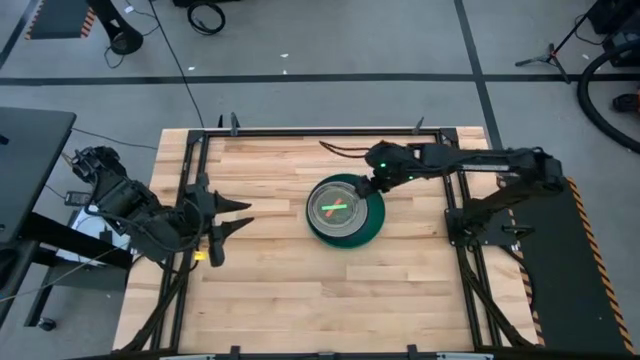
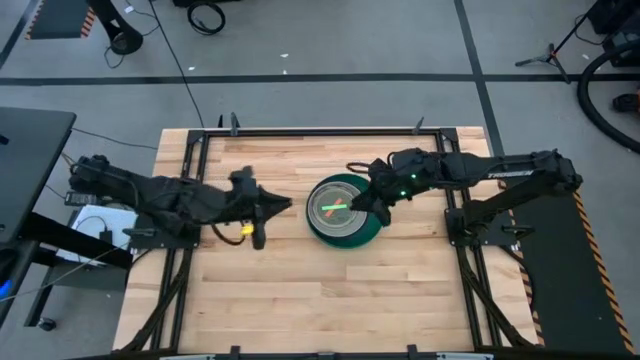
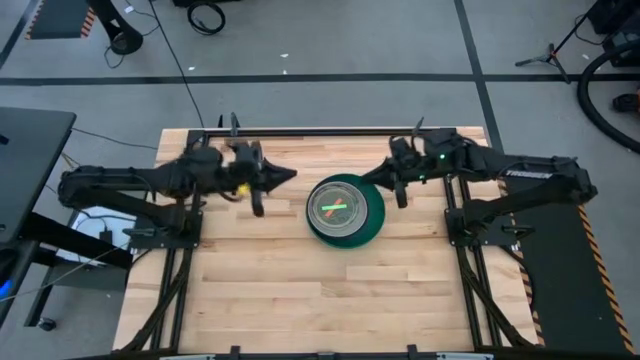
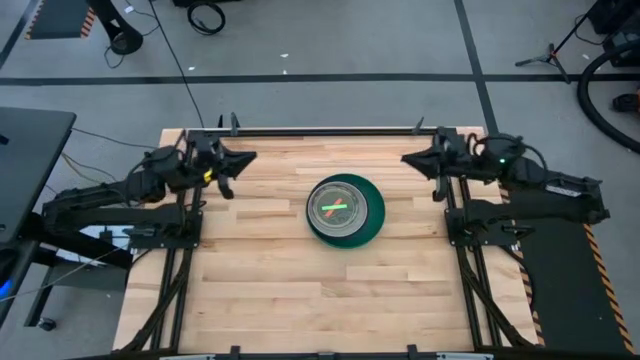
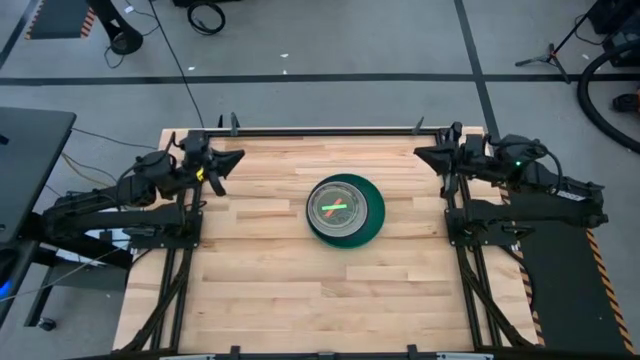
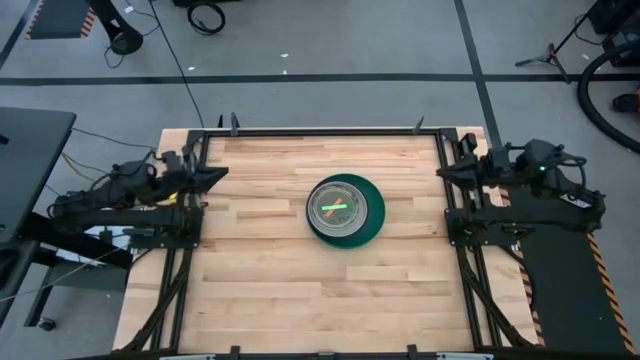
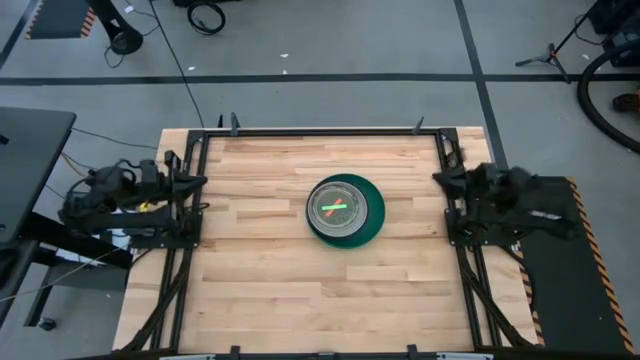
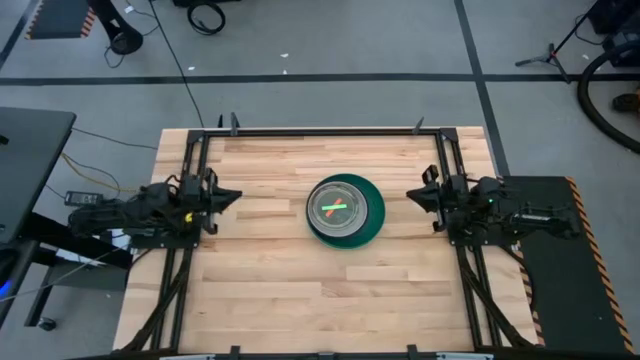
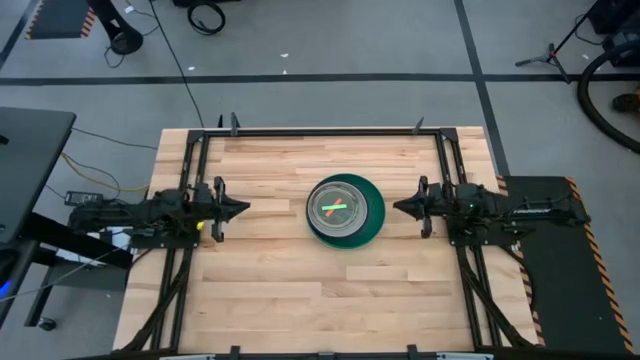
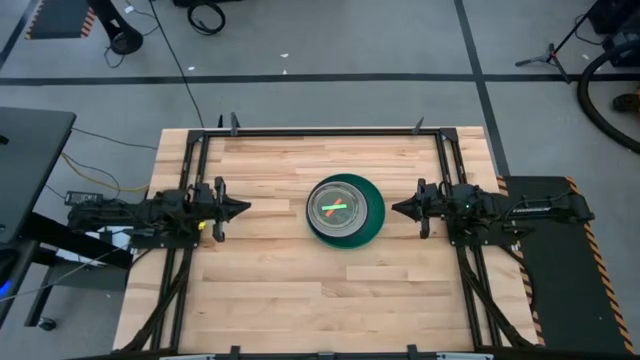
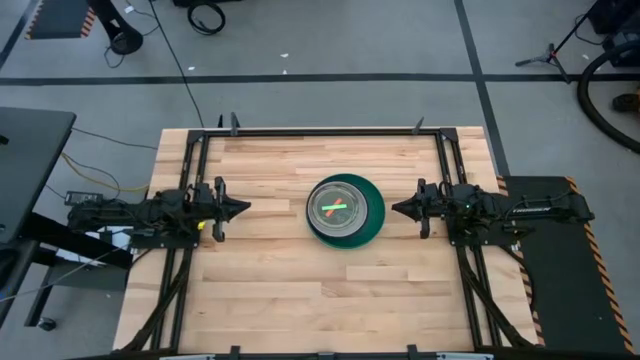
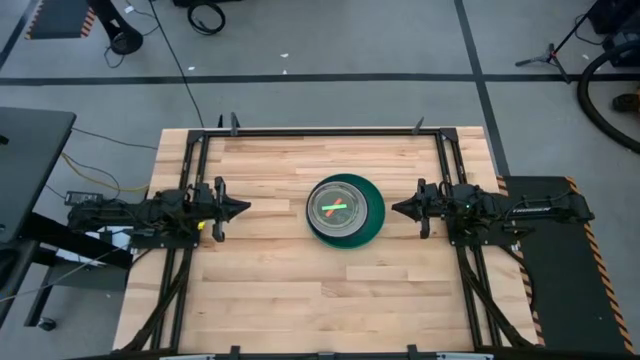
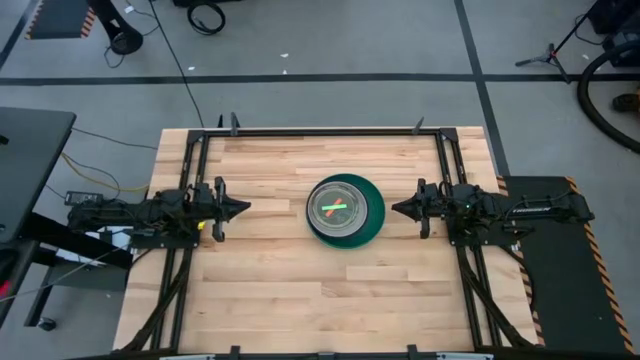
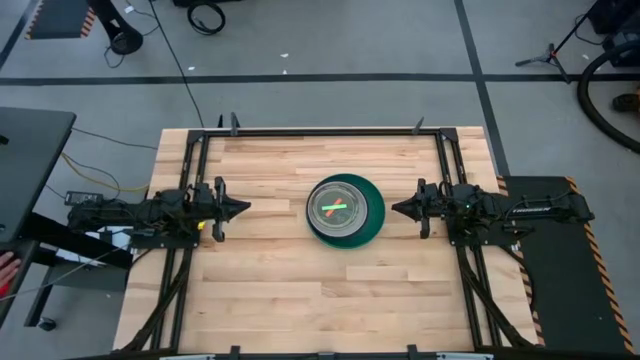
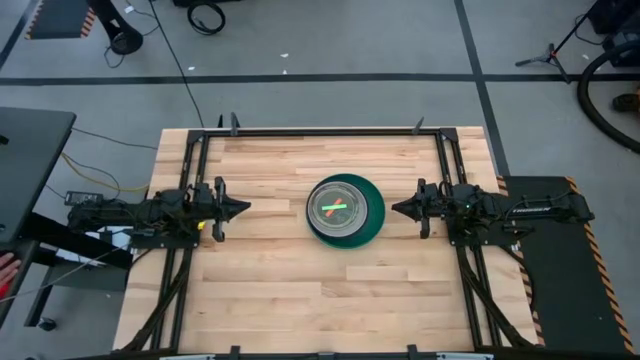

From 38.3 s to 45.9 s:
Task: Stack plastic plates
Return to Home Position

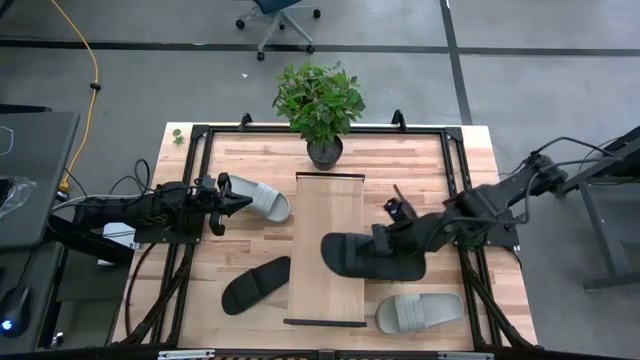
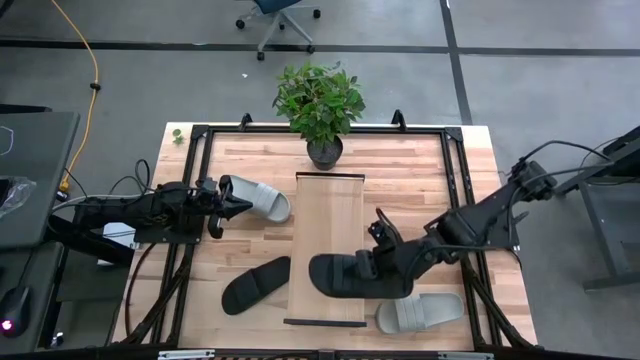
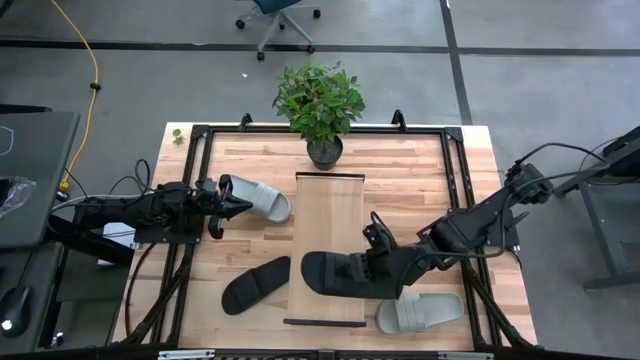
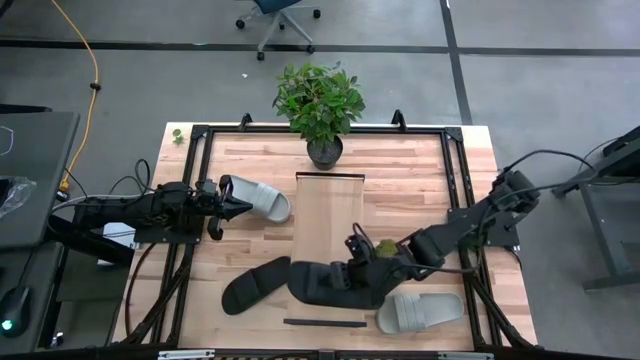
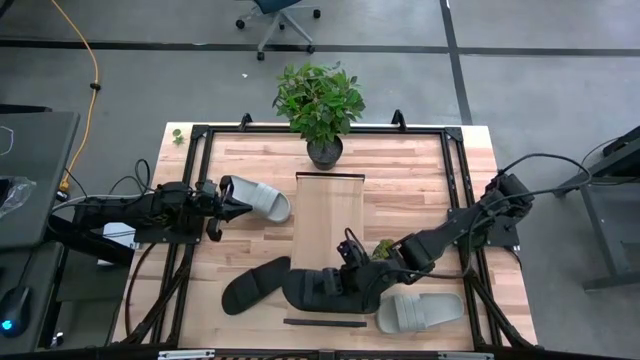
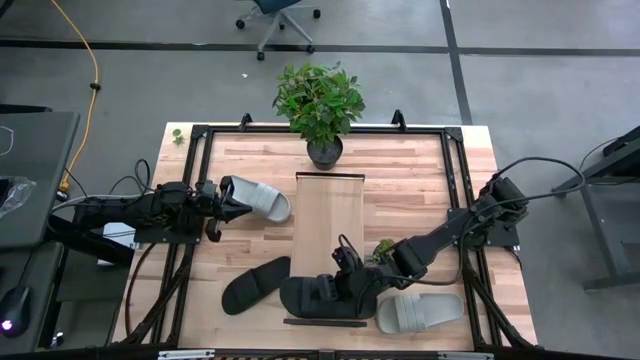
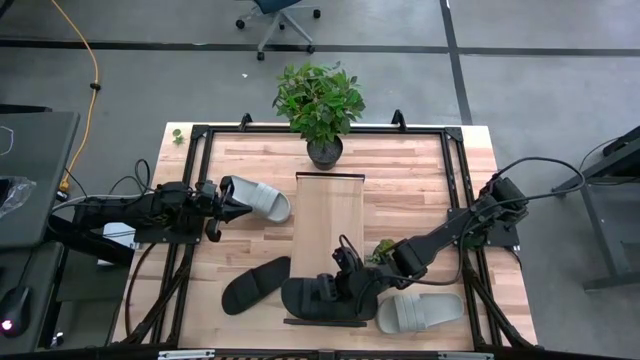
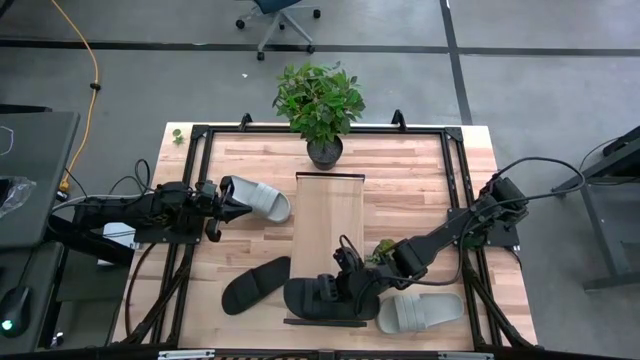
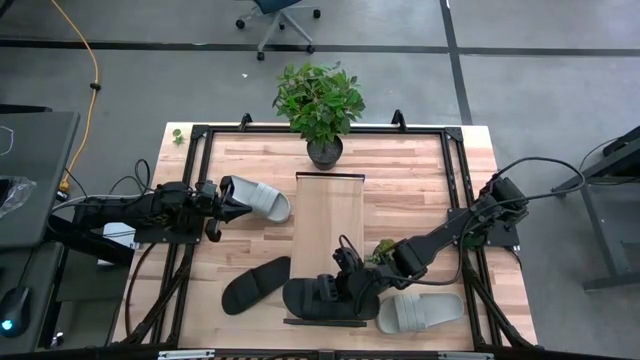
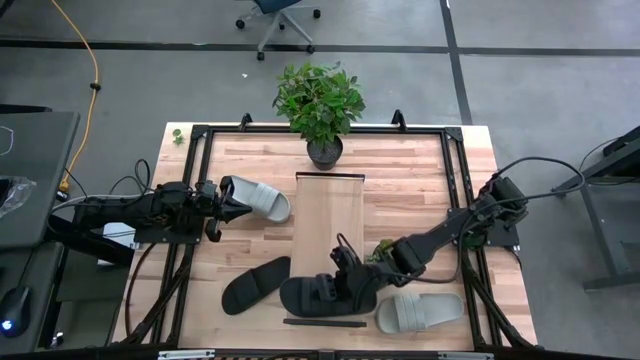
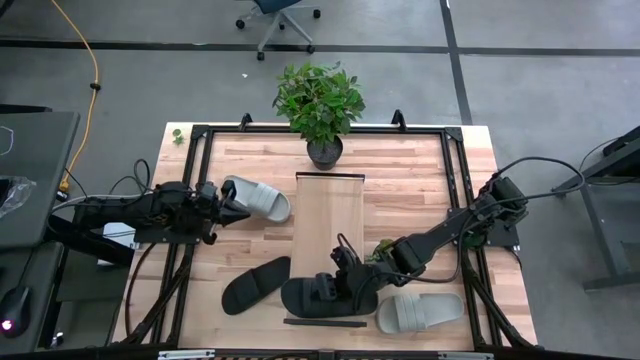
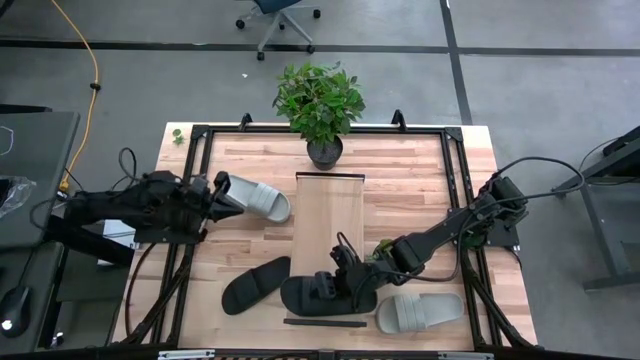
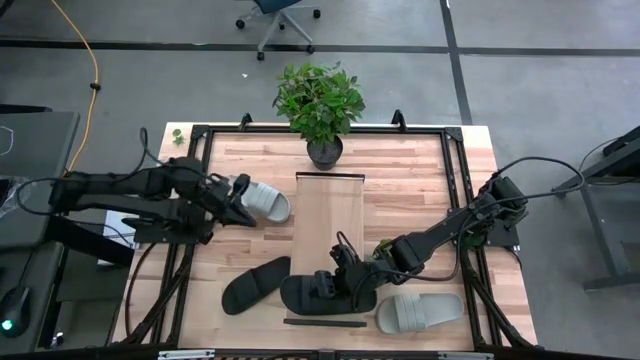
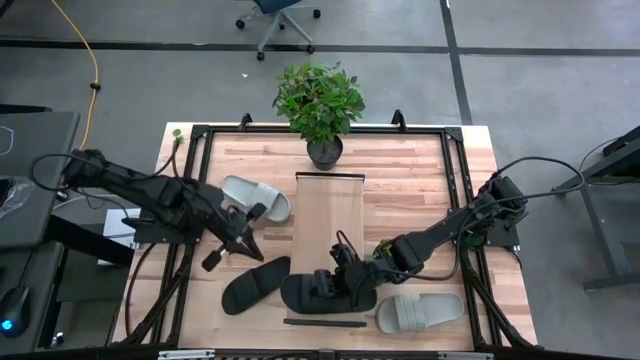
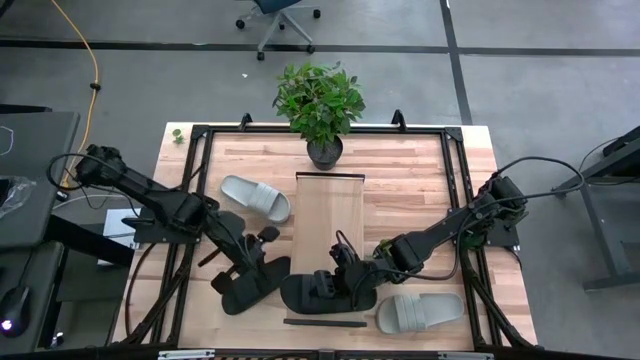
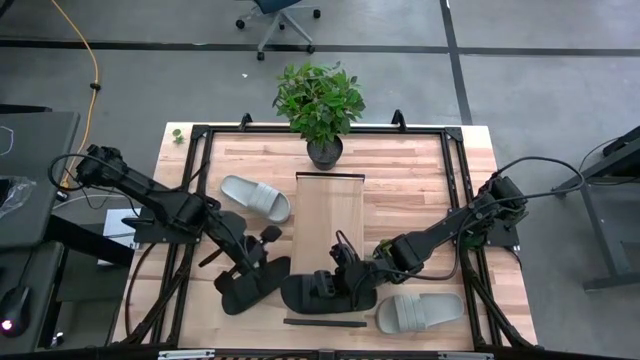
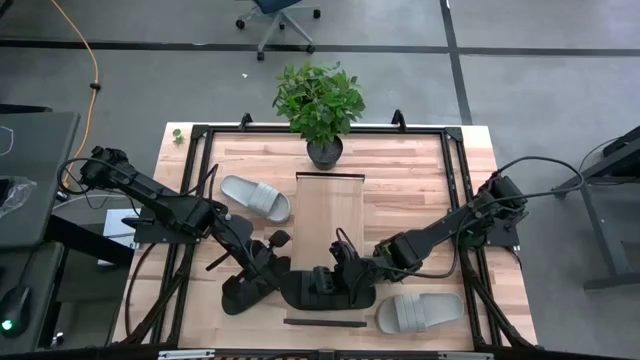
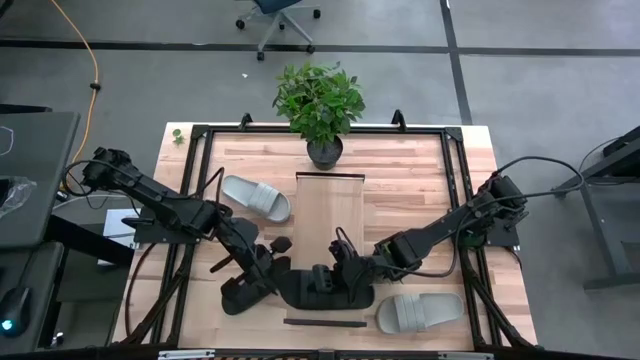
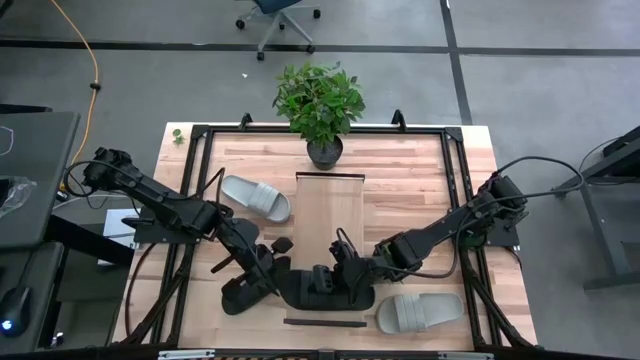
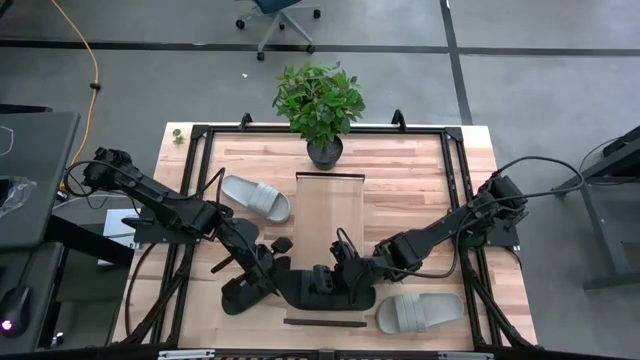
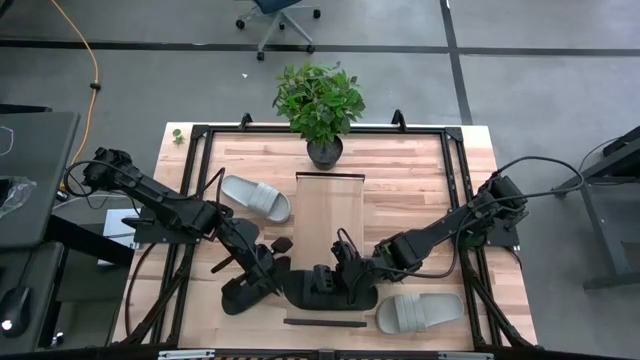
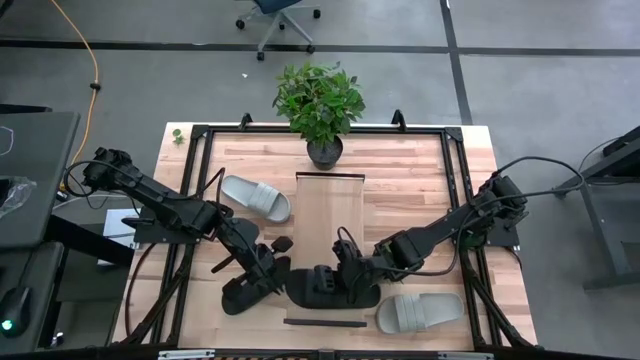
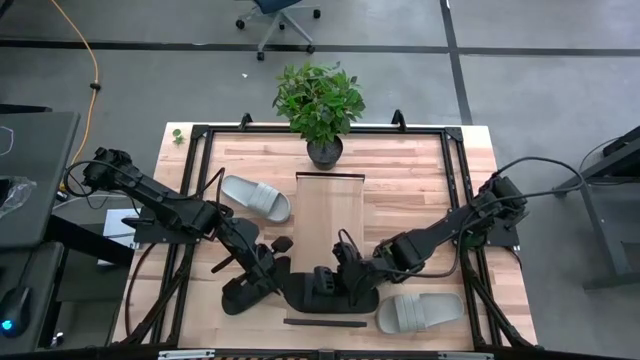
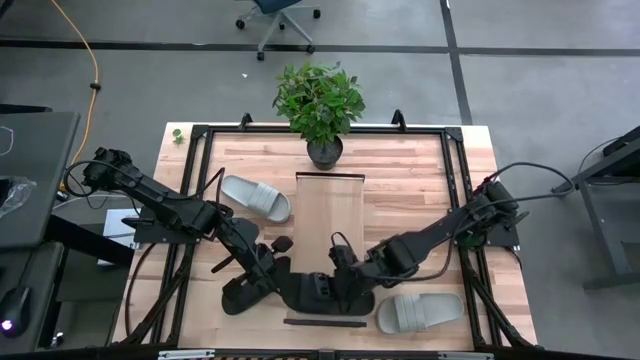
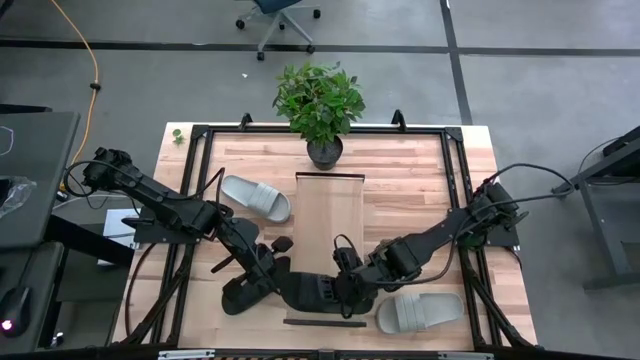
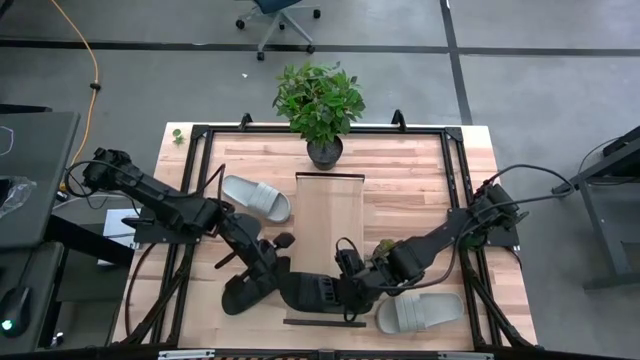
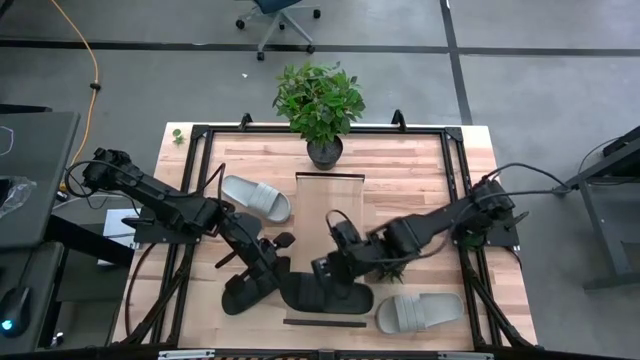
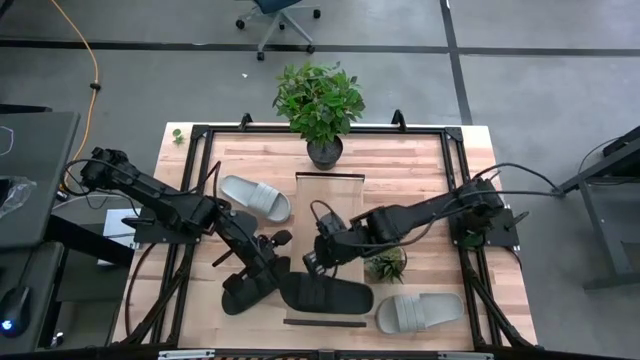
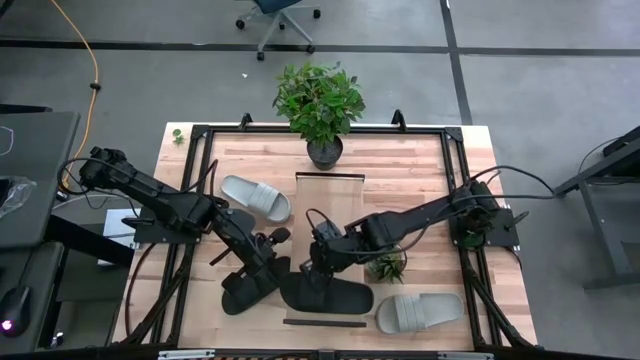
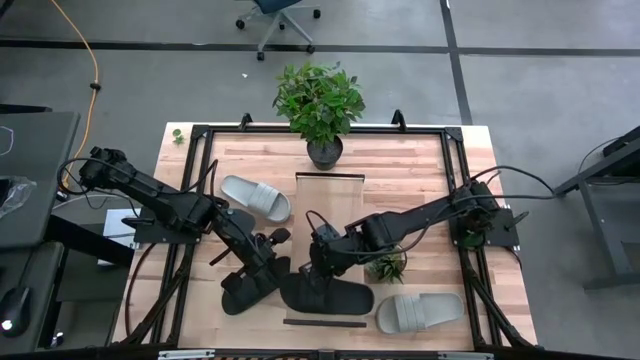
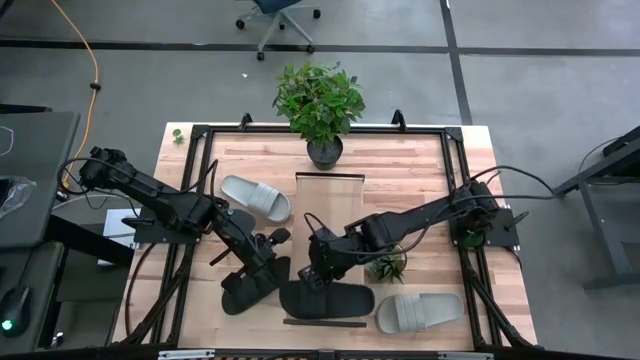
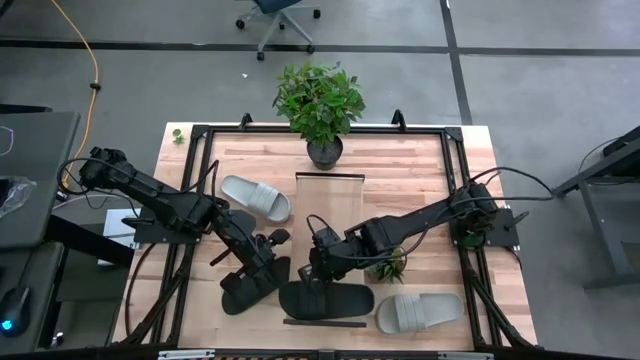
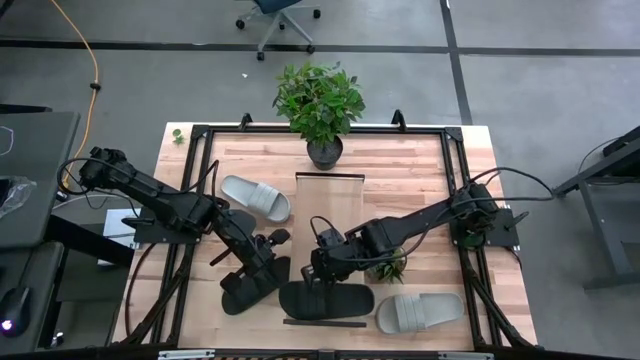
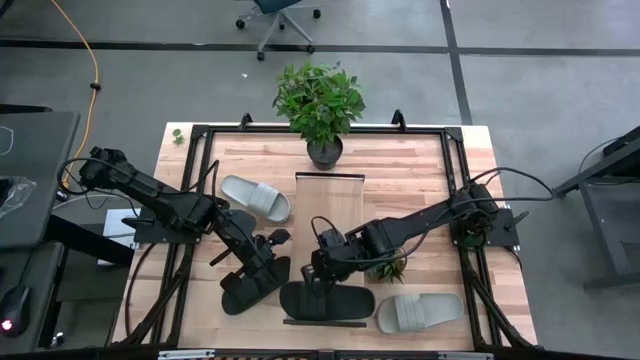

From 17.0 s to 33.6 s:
Task: Pick and place slides into the shelf
Put the top black slide into the shelf
